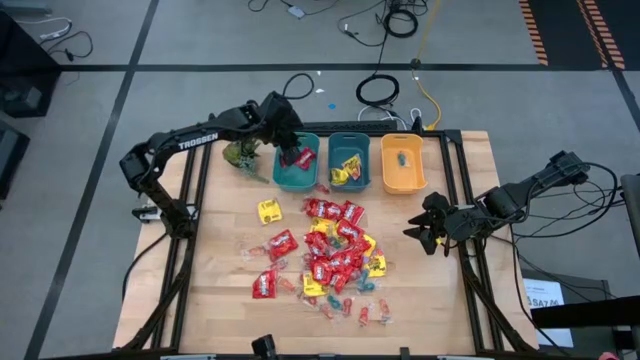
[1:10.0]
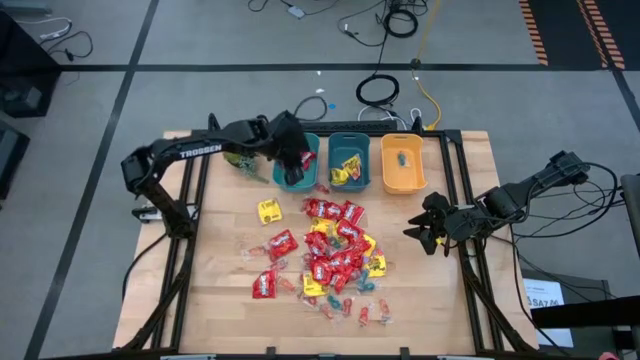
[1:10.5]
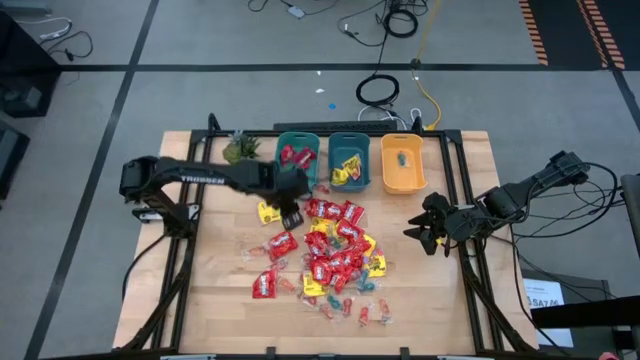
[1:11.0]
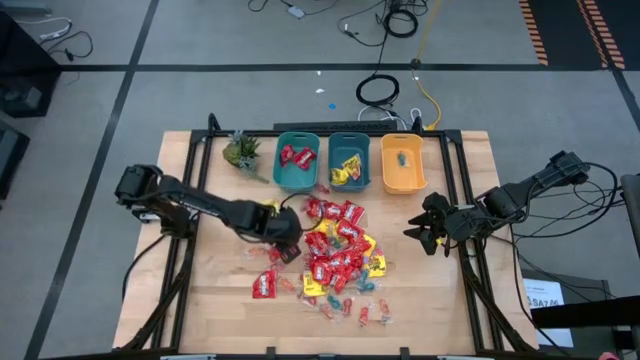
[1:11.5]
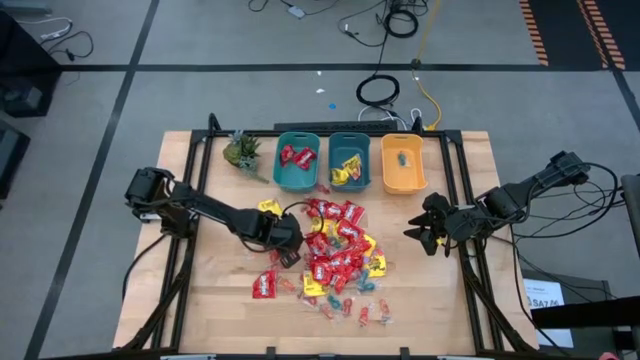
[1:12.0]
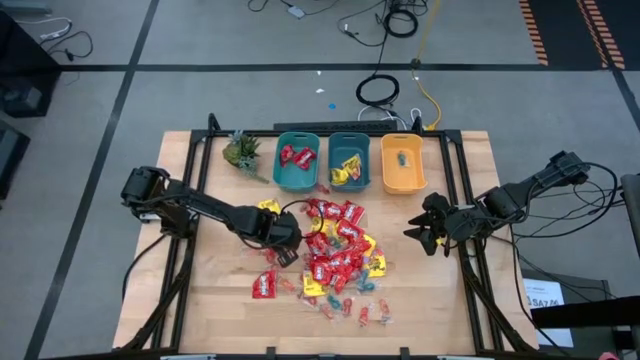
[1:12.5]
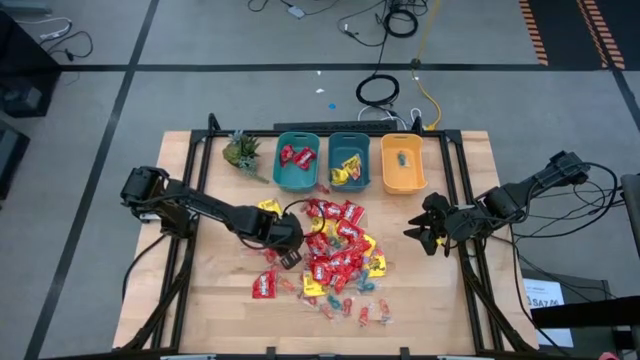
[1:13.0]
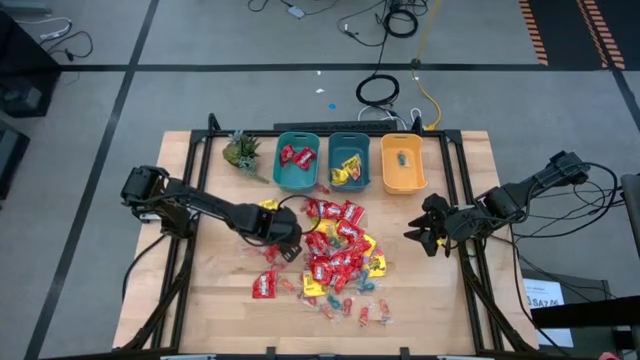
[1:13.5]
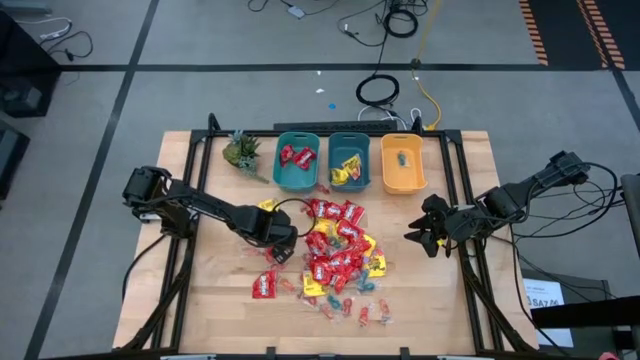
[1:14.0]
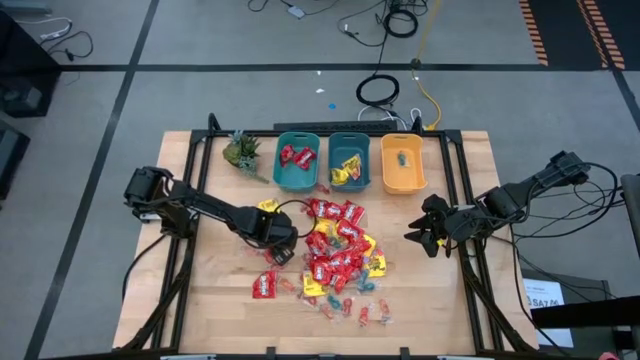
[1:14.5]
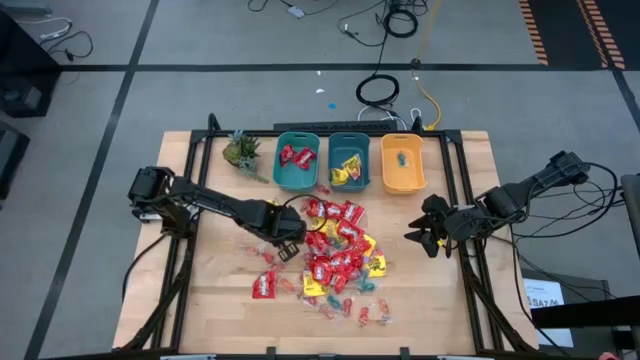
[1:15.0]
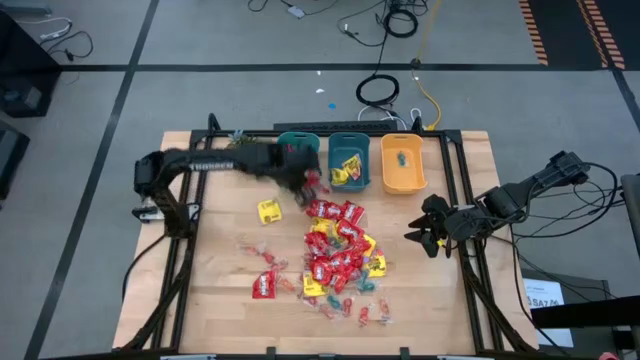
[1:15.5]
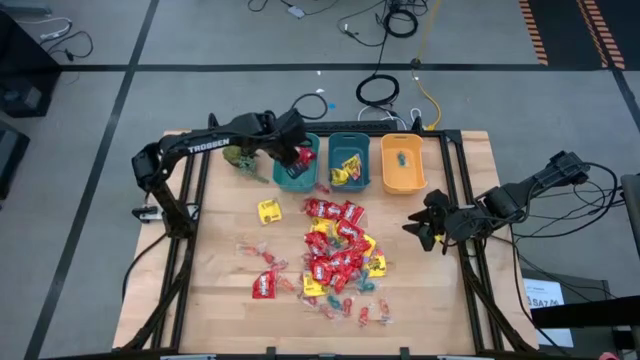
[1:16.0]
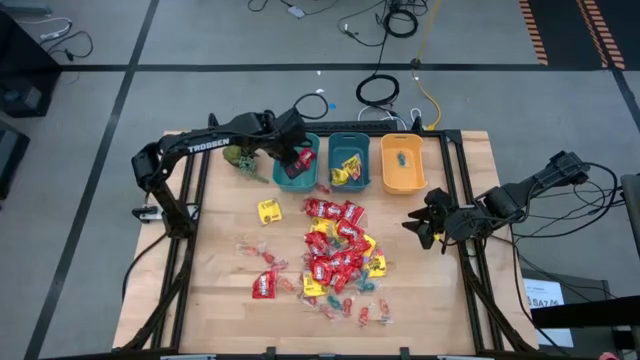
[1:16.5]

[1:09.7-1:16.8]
Task: Sort candy
Put the red candy into the green bin

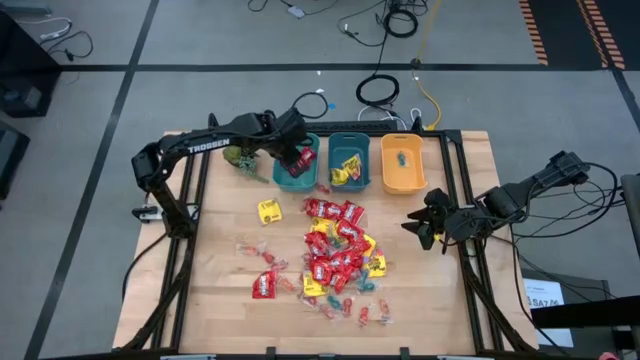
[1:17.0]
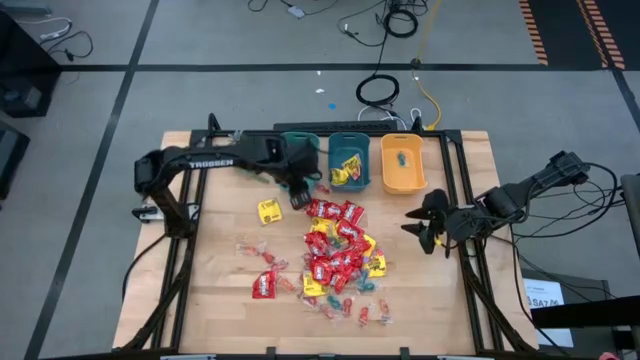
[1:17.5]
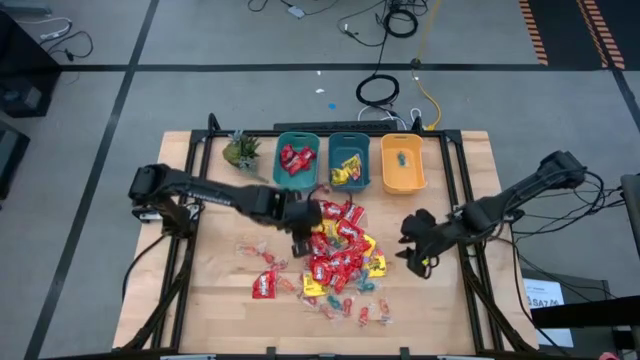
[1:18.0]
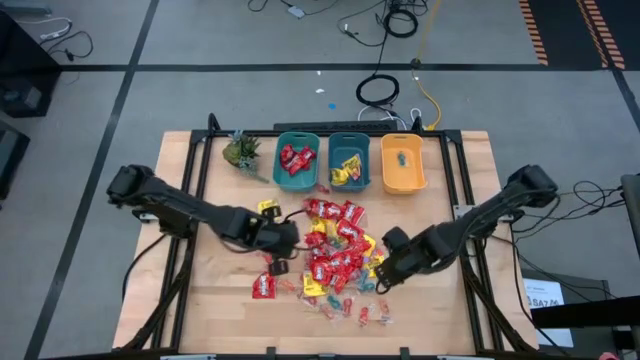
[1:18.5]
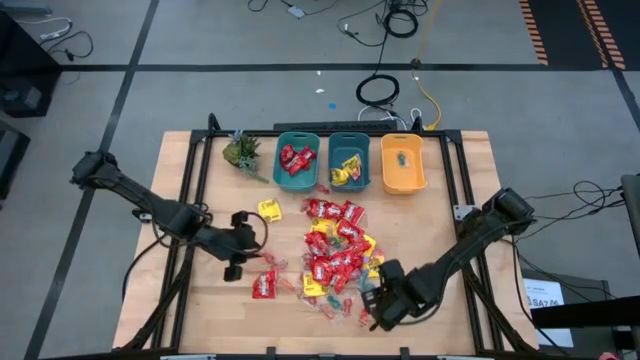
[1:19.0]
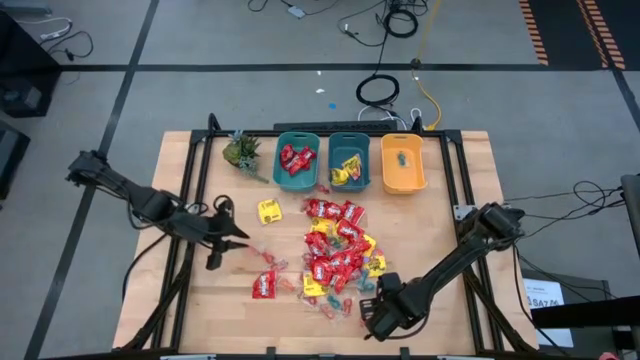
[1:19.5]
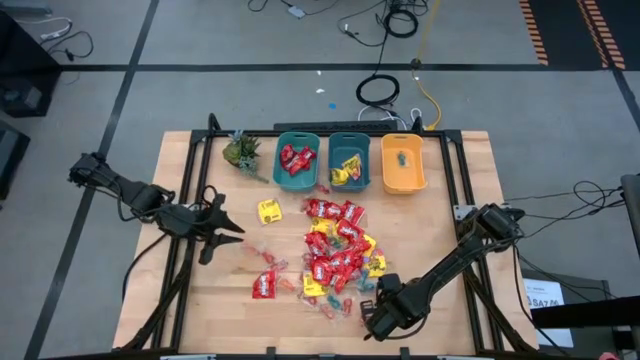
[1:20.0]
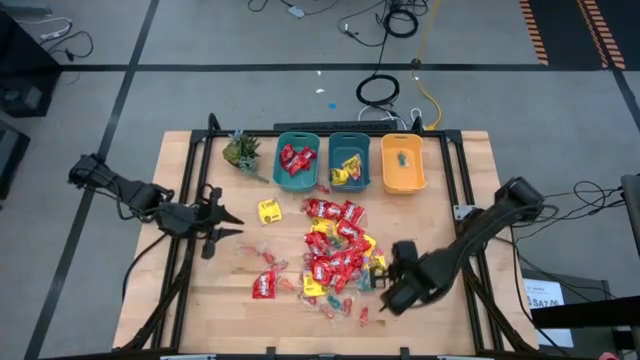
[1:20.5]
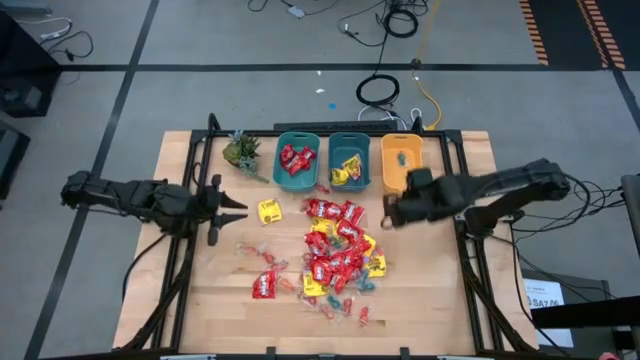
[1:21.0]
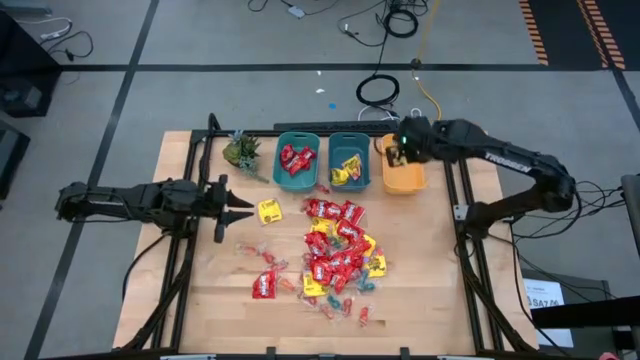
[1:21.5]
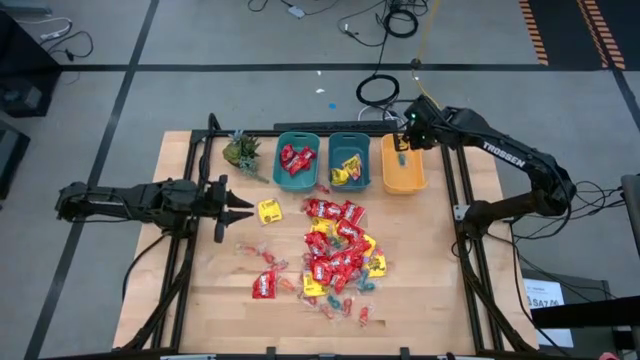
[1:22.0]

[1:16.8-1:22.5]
Put the orange gummy candy into the yellow bin

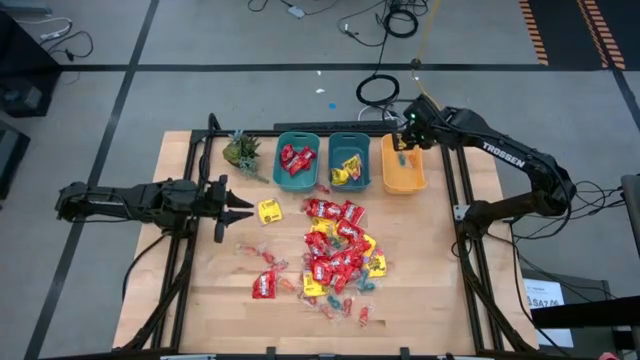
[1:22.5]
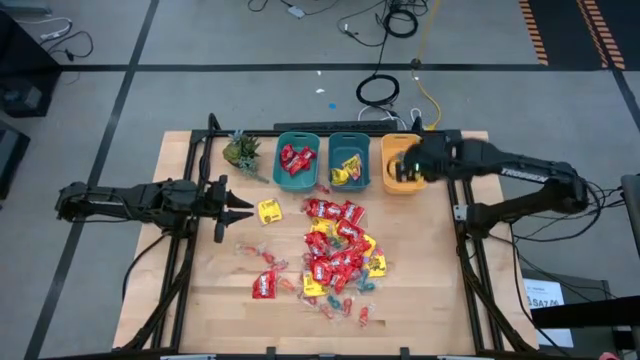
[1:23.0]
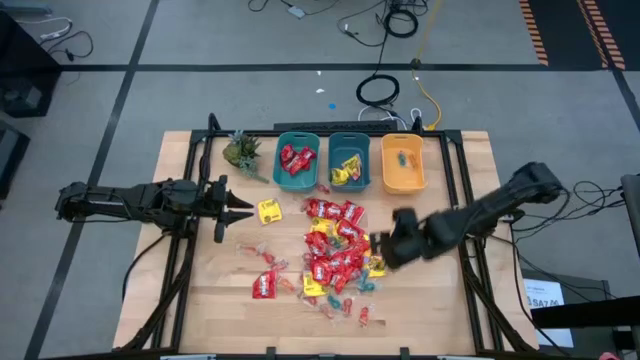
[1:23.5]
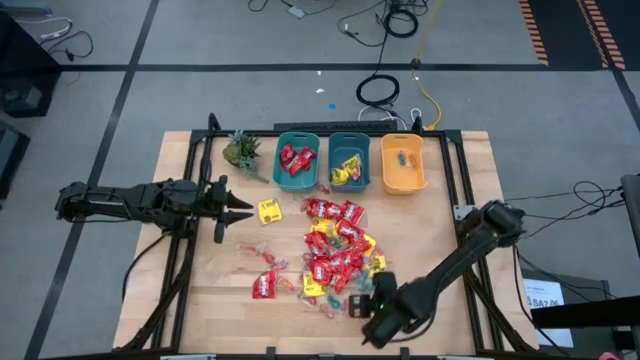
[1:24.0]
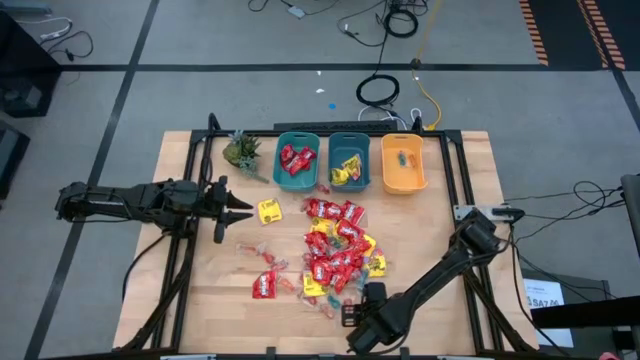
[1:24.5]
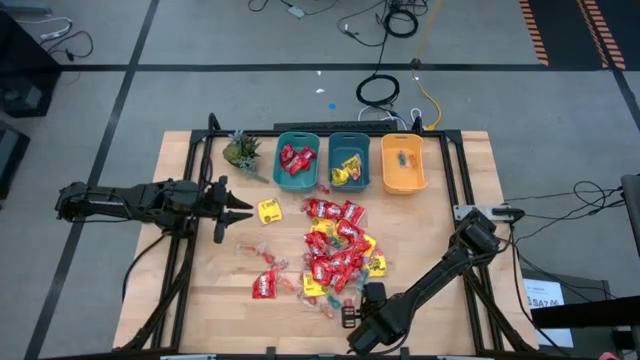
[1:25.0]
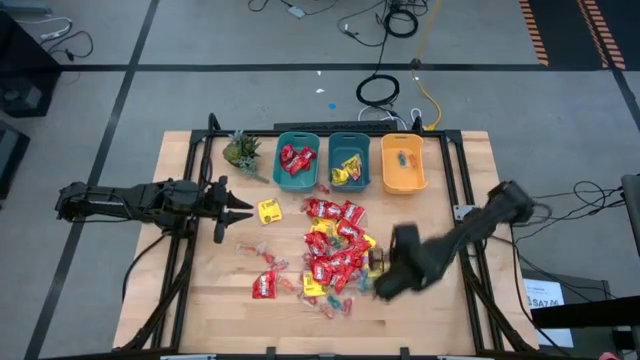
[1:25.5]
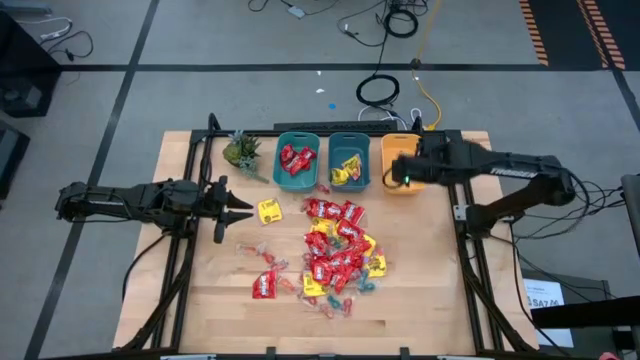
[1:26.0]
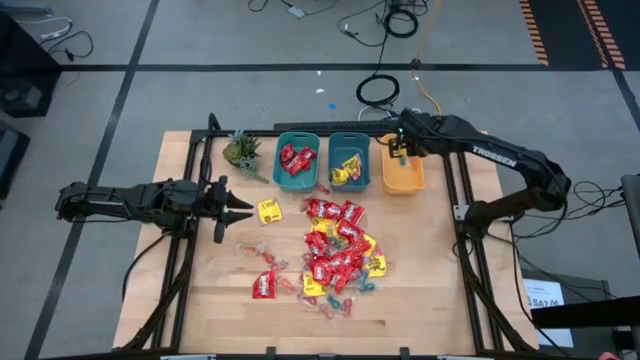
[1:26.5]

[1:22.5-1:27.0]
Put the red gummy candy into the yellow bin

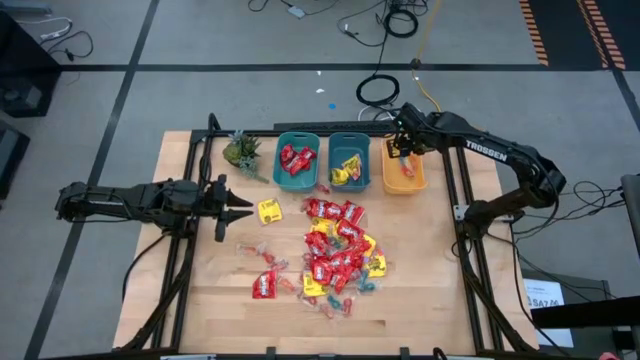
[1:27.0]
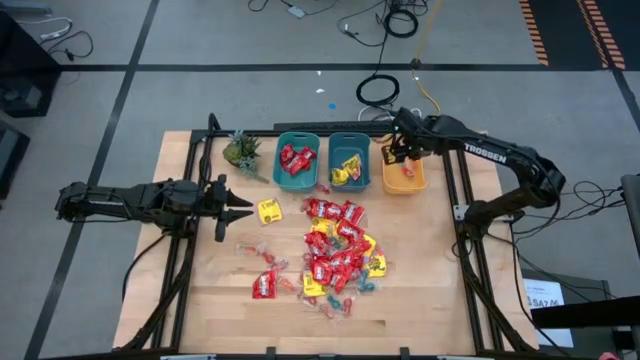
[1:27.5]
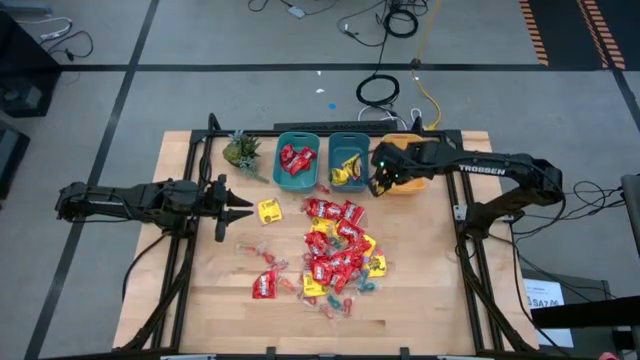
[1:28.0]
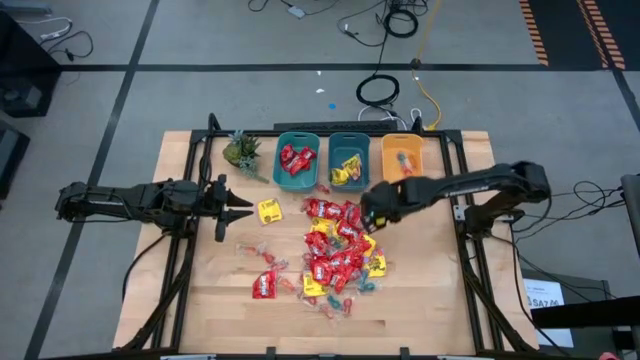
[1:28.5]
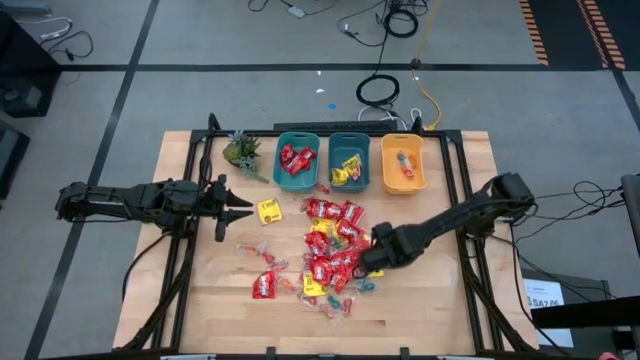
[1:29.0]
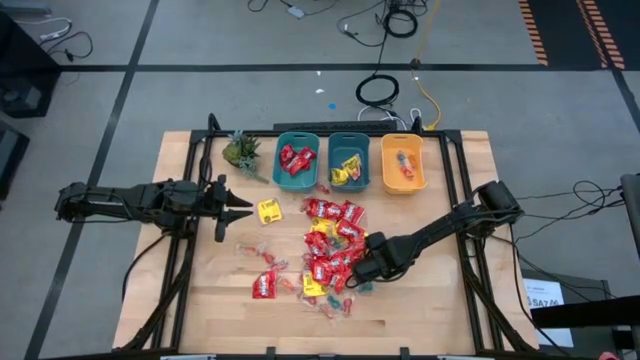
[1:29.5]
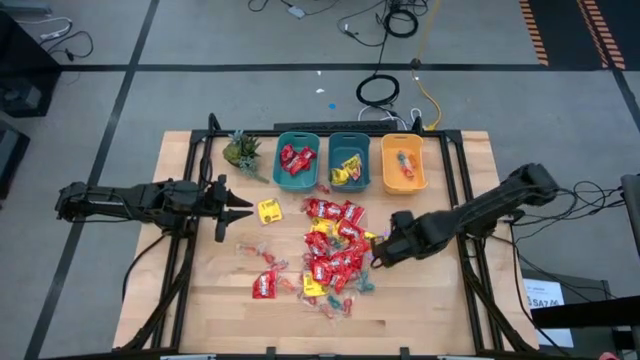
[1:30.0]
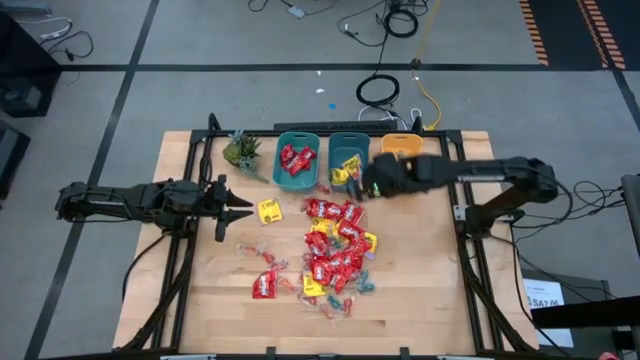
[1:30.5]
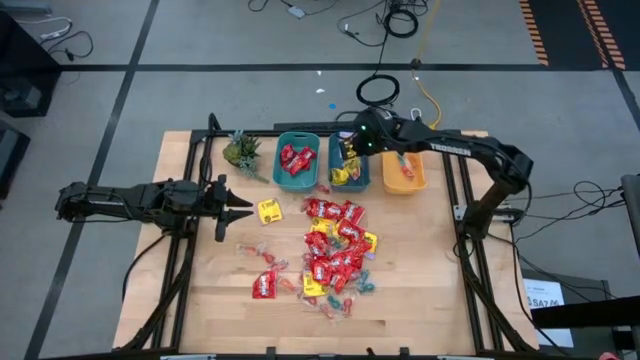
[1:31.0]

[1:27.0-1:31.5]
Put the yellow candy into the blue bin
